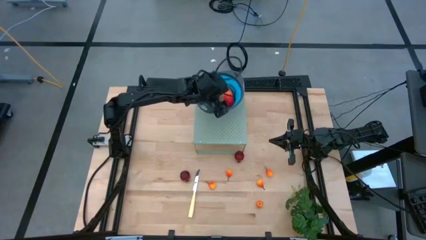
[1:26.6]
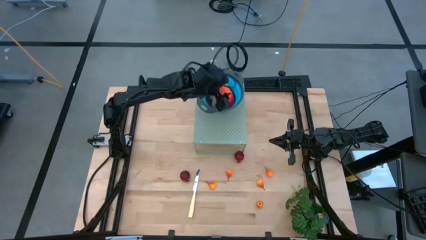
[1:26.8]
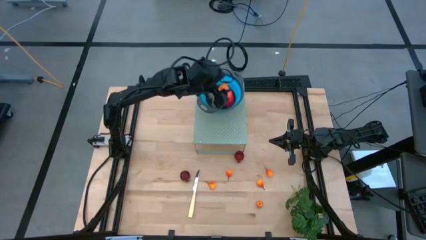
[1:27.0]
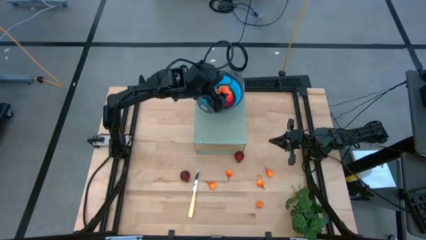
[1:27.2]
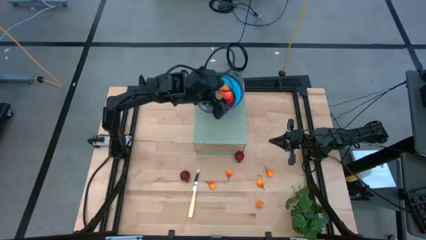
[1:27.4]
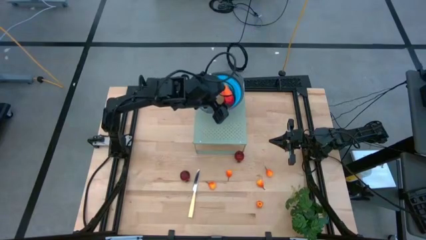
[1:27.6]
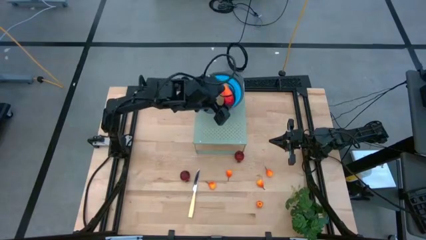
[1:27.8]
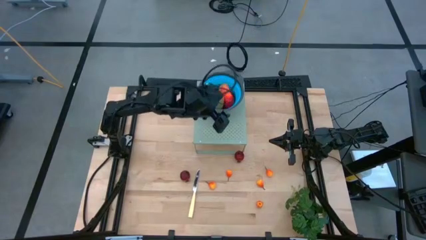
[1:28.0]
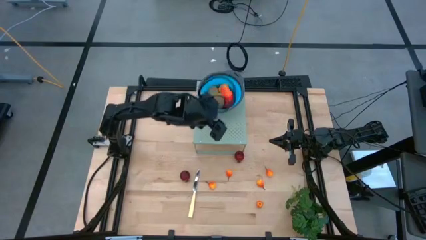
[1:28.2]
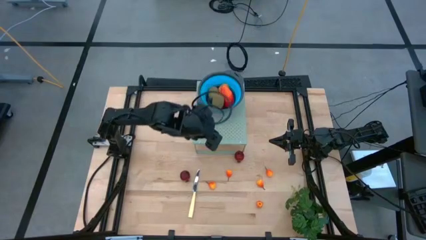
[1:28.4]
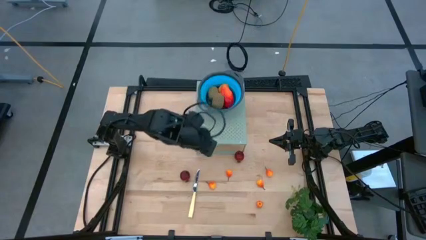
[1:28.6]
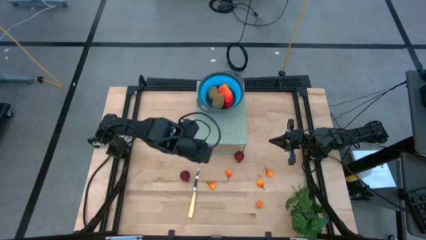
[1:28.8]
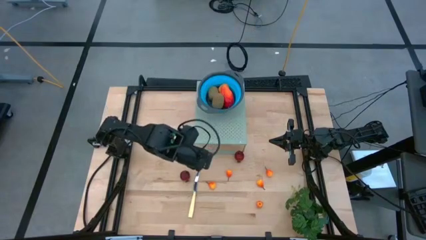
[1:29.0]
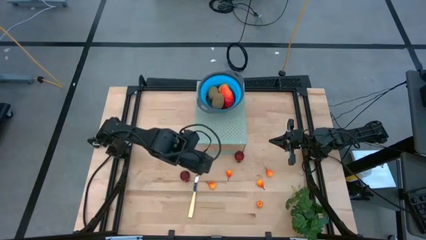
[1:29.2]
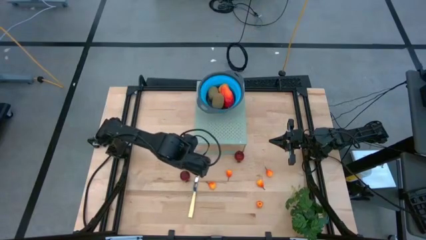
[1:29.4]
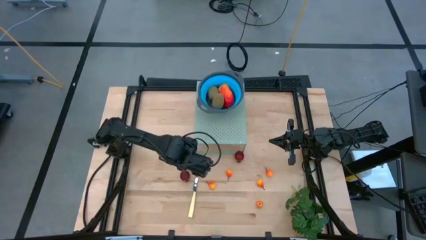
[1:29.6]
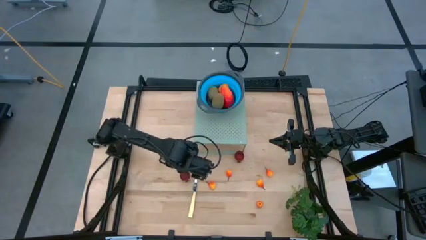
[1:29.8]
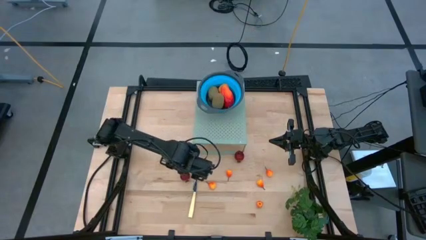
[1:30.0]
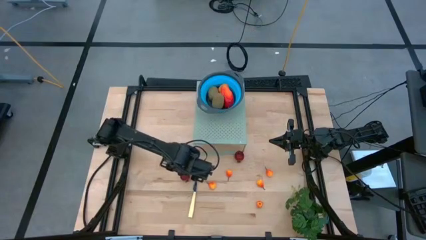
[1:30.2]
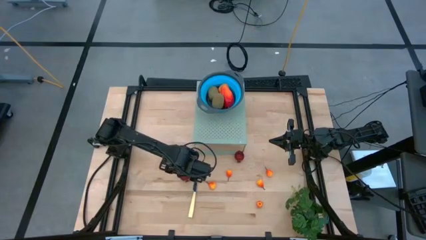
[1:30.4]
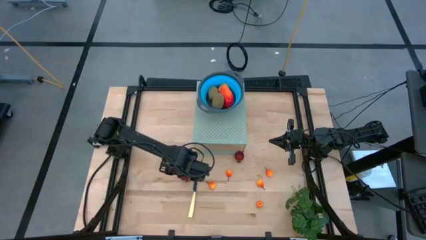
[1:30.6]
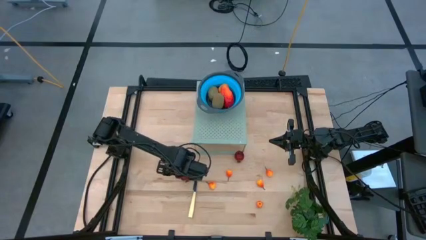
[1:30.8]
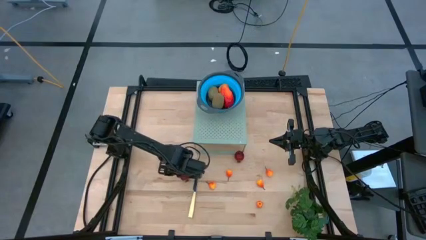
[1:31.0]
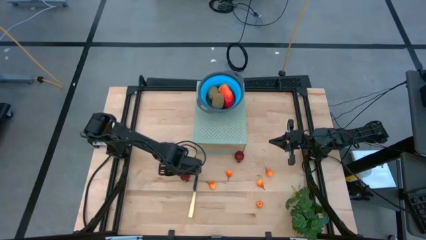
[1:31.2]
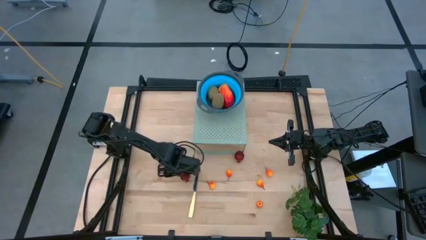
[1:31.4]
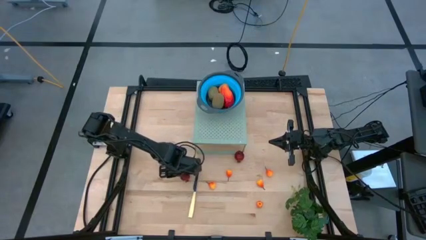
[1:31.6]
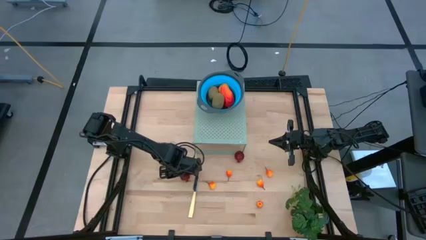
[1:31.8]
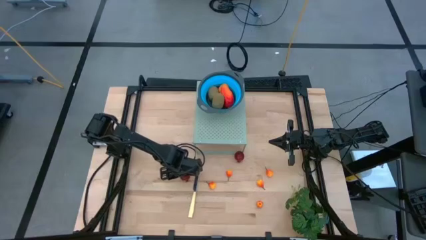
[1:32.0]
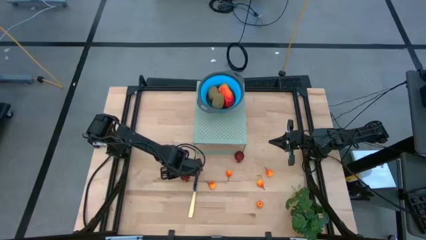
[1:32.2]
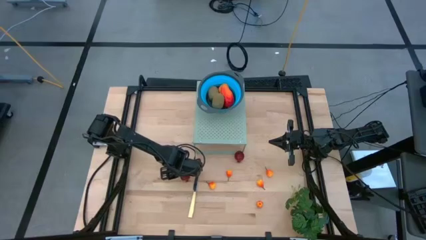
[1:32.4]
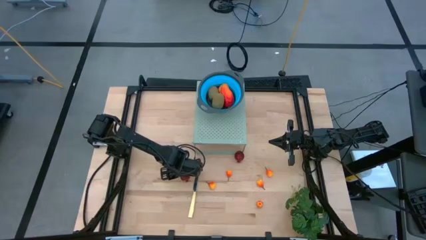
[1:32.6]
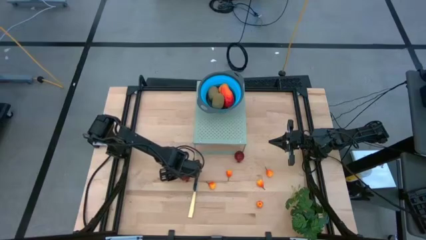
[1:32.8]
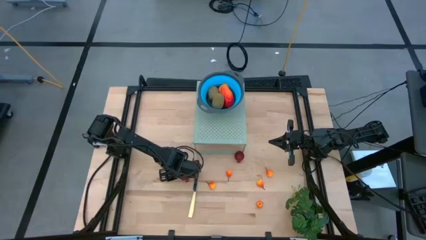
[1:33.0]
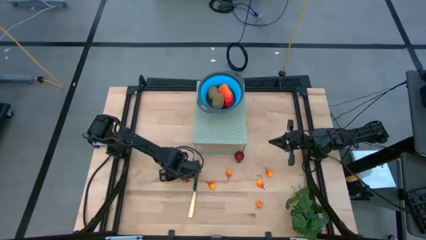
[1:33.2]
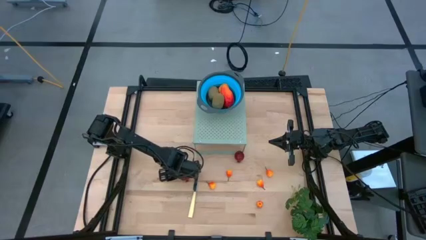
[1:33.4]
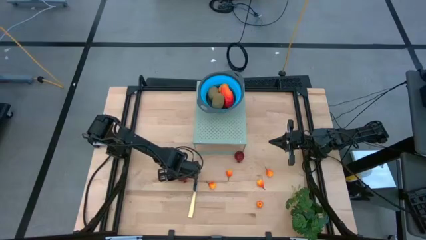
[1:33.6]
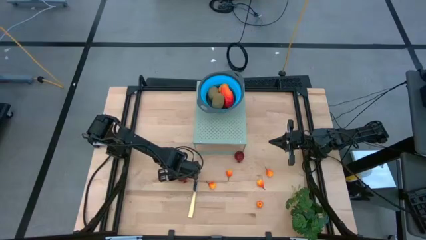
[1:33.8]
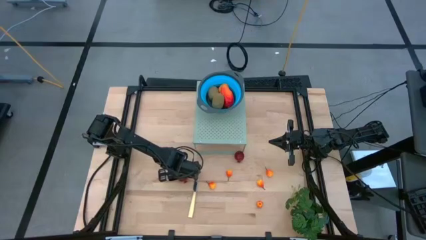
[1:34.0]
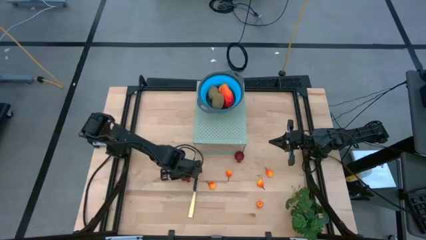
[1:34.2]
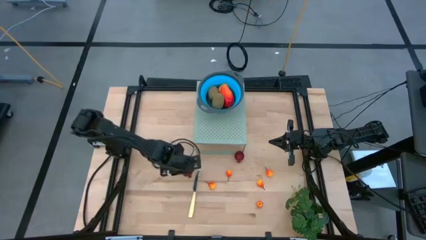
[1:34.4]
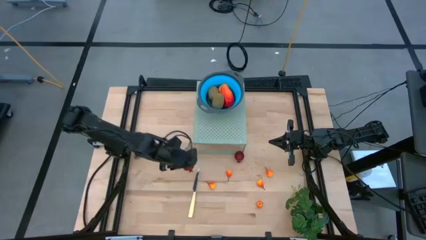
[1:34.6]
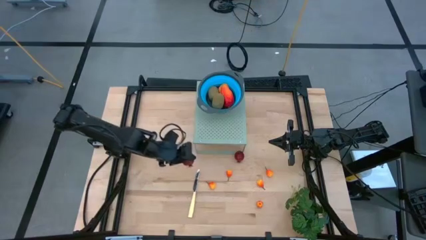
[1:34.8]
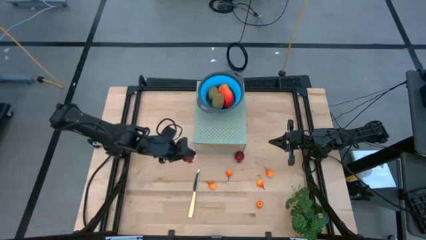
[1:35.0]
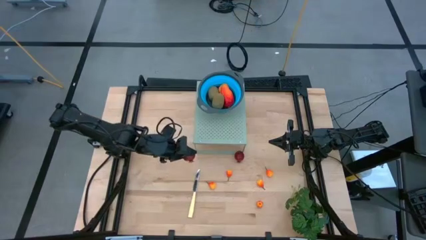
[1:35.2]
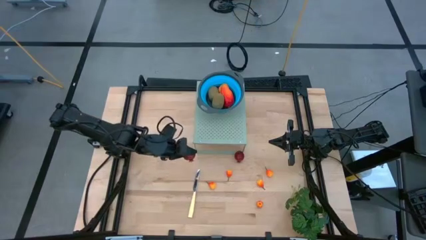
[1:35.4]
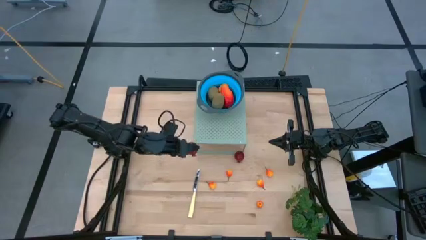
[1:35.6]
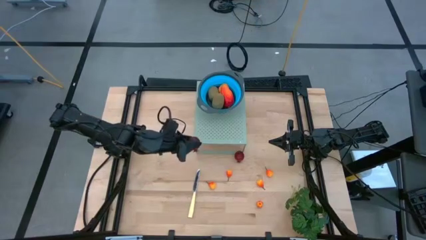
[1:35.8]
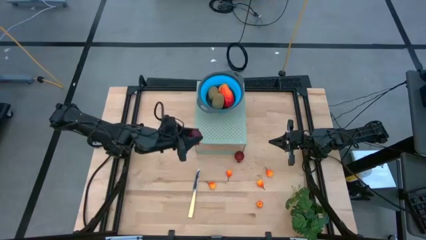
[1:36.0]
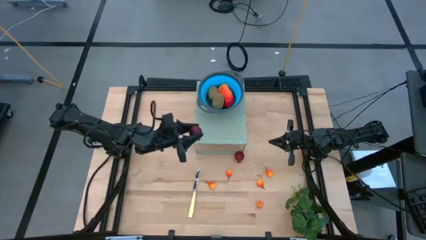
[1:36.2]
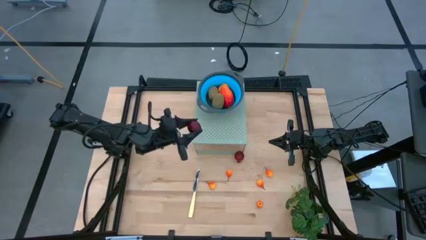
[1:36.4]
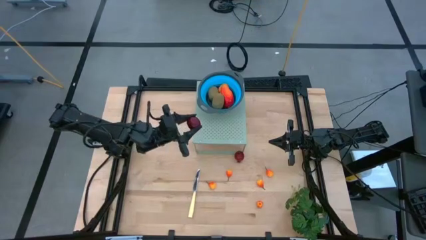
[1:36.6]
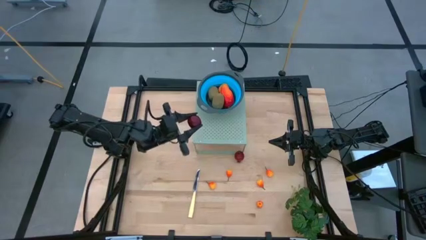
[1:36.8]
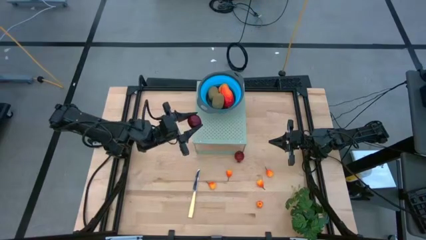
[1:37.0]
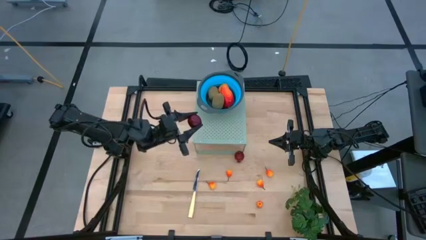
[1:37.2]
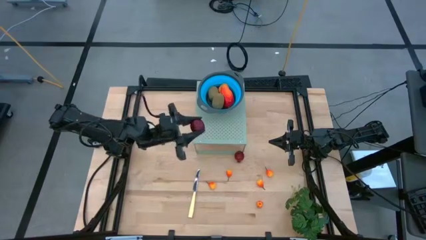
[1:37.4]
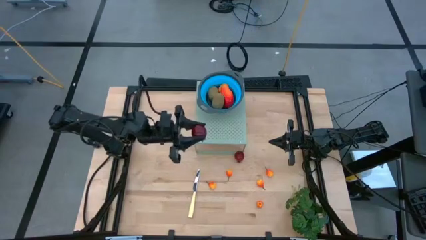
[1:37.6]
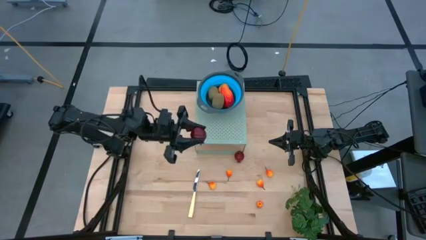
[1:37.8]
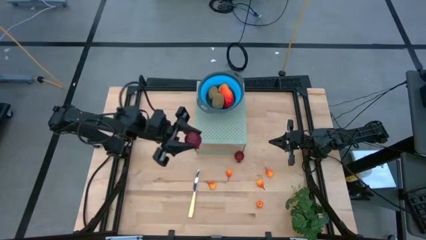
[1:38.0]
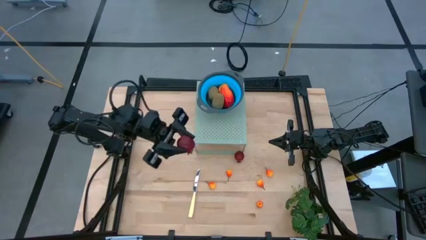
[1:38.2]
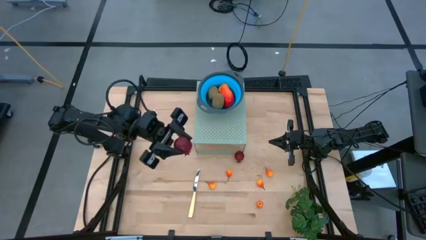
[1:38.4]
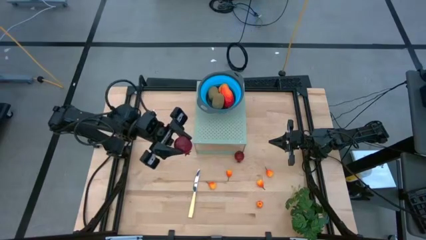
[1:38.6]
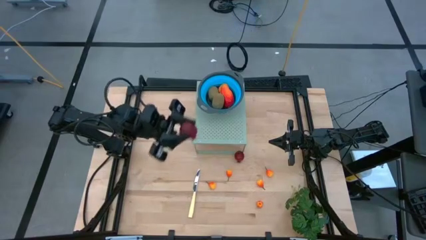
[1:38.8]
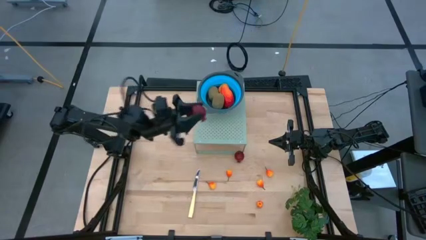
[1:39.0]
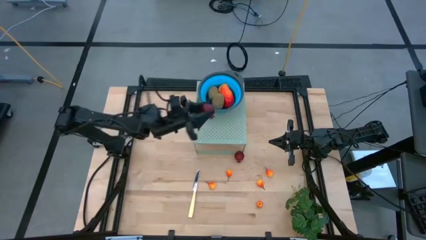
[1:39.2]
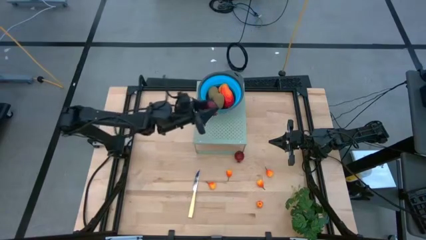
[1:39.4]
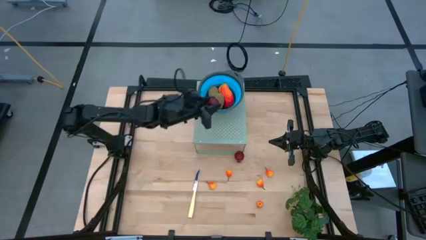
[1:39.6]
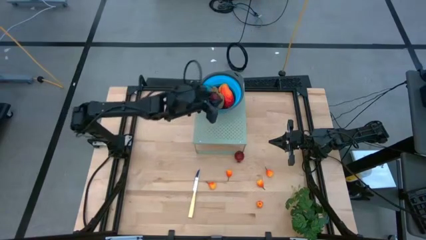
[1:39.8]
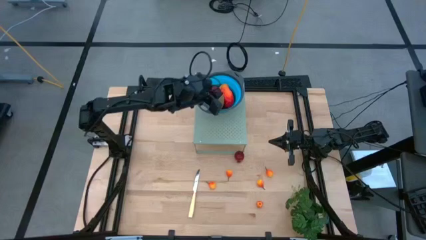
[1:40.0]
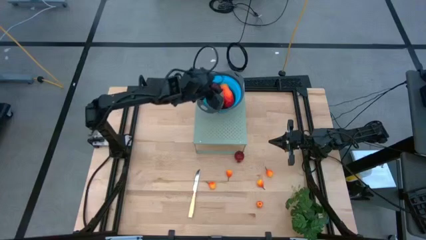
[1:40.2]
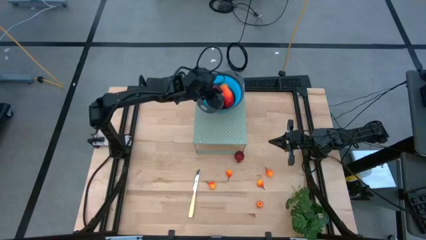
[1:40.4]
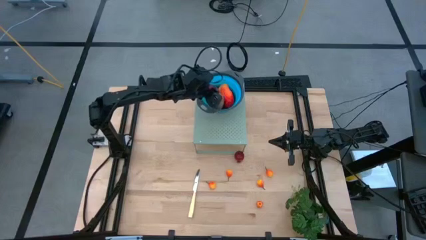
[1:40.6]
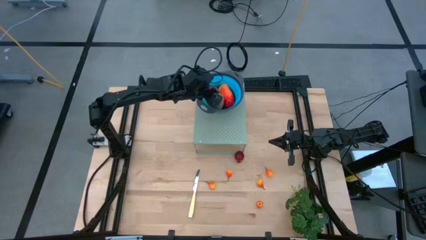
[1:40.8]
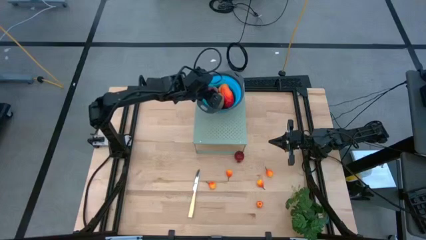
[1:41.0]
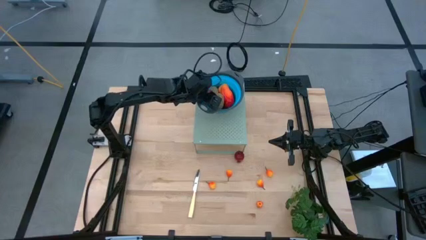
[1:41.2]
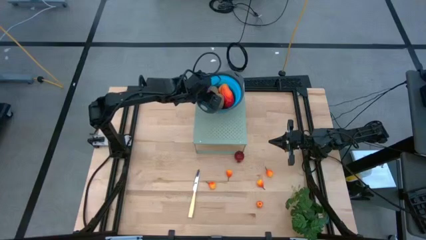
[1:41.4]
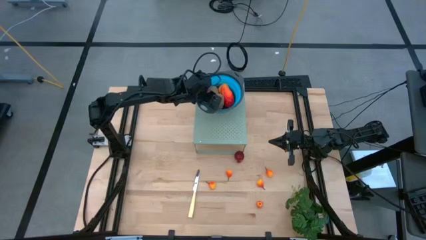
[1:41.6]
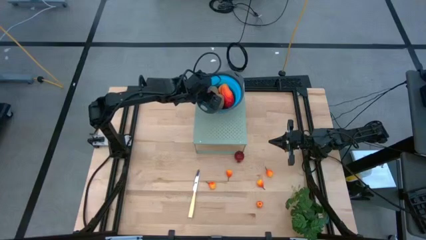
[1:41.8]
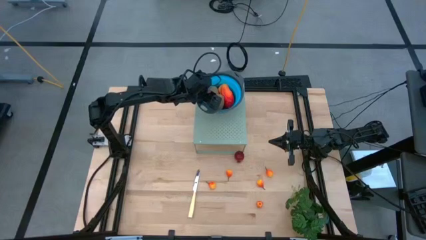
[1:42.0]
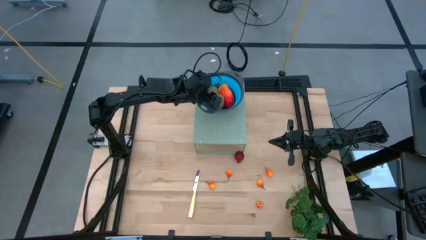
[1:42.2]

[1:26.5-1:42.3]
Task: Pick & Place Fruit
Put the pomegranate into the blue strainer bowl on the shelf
